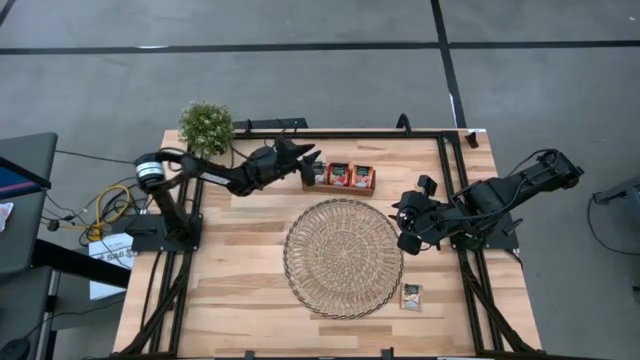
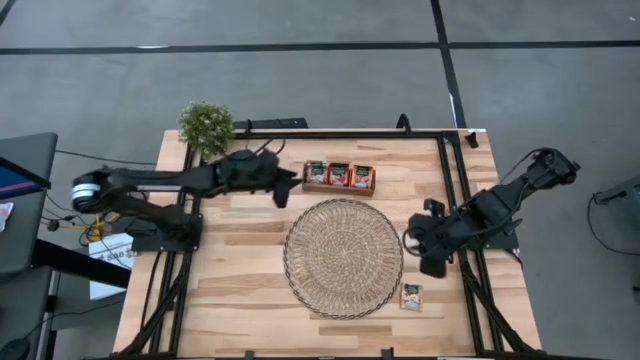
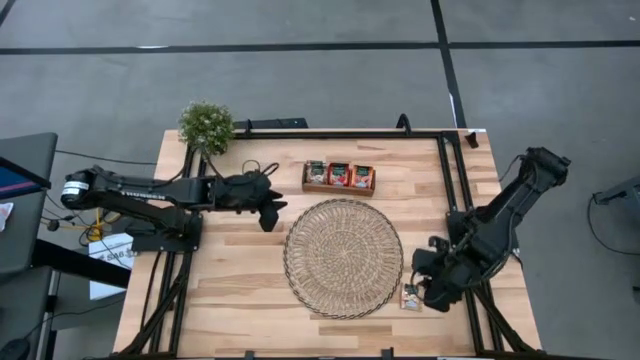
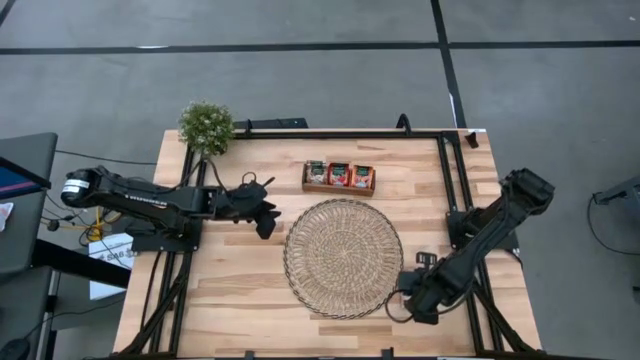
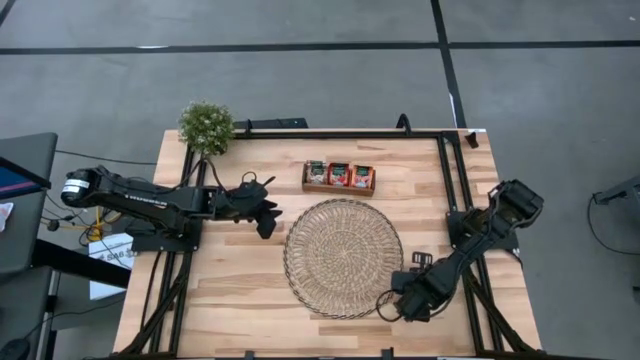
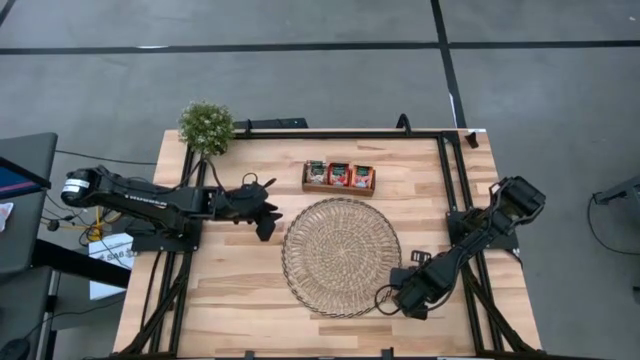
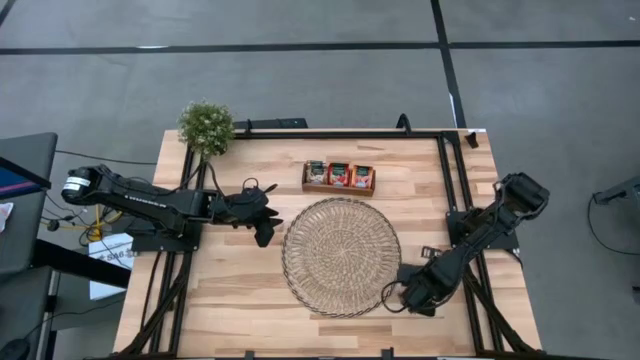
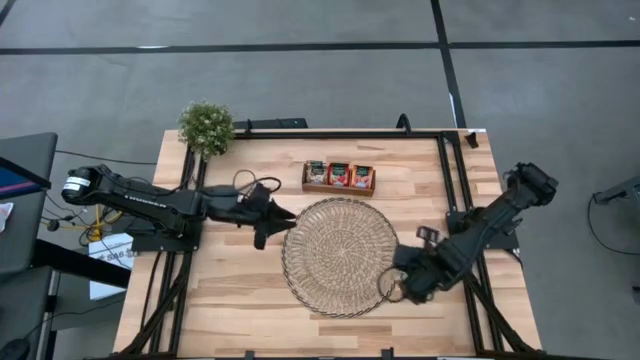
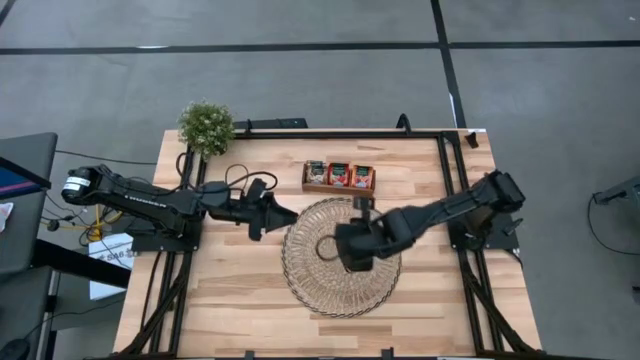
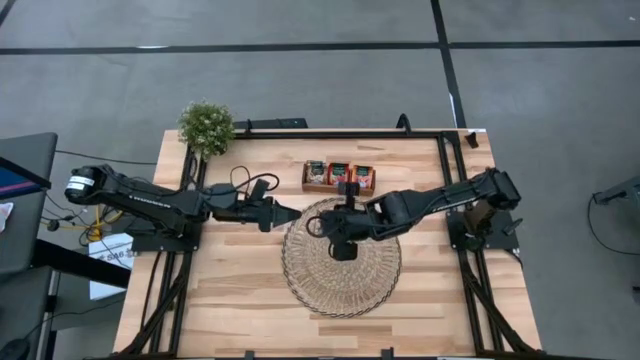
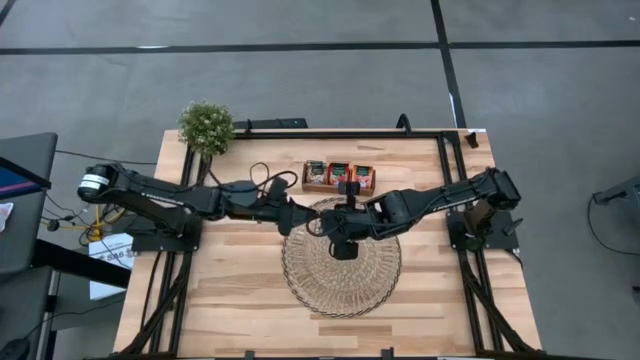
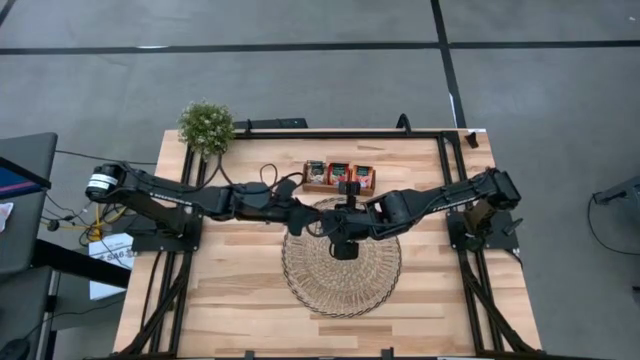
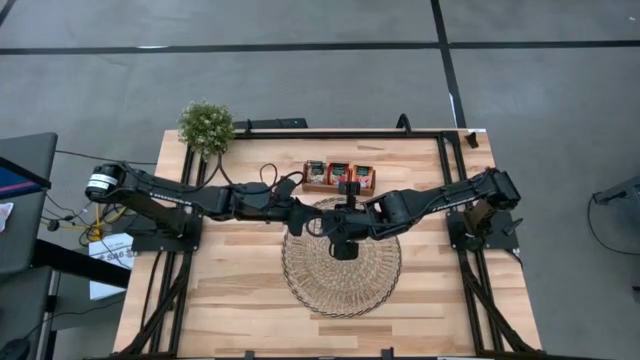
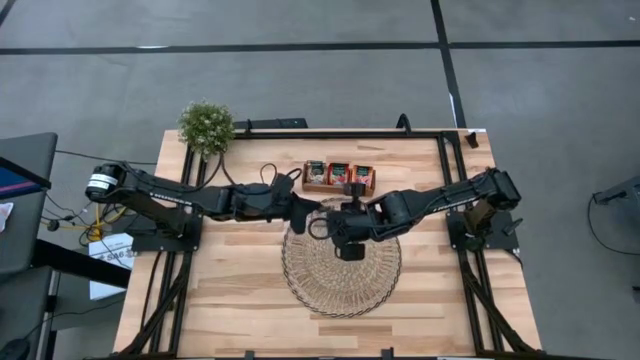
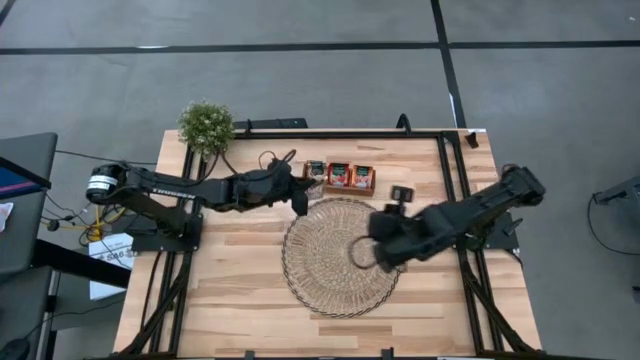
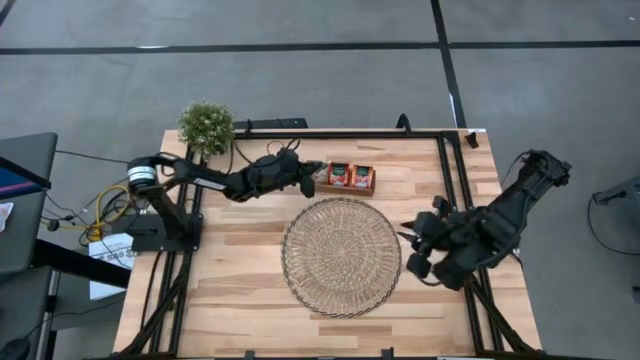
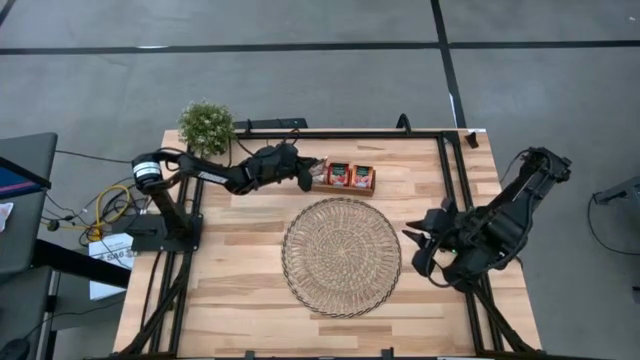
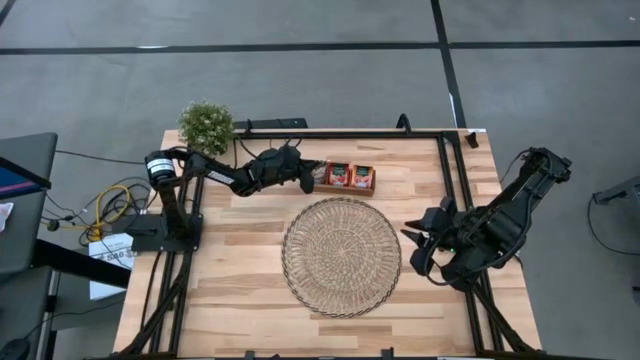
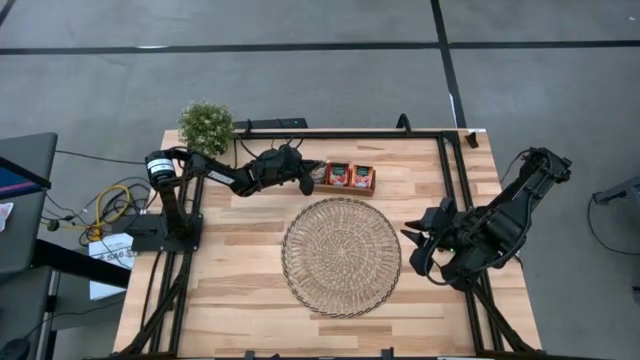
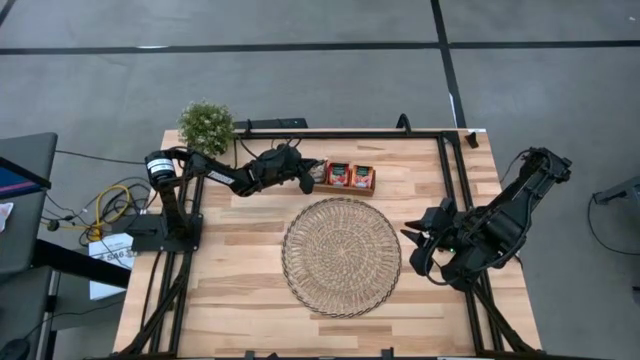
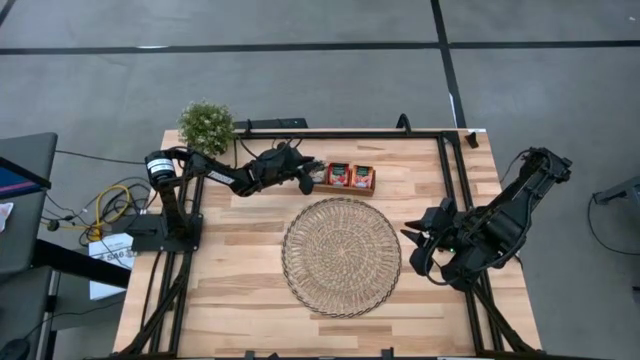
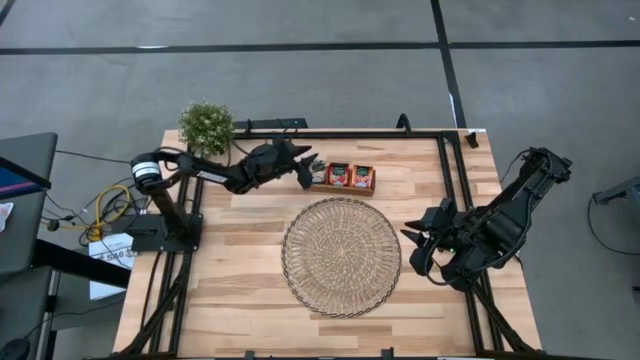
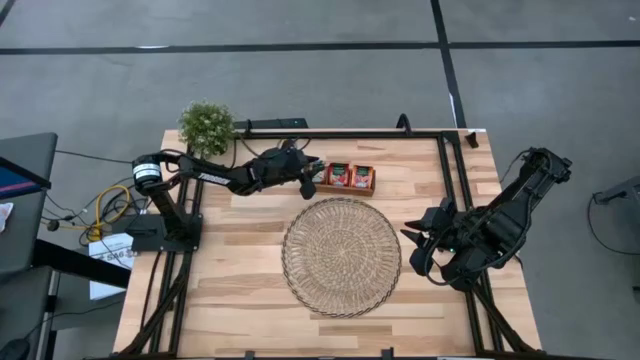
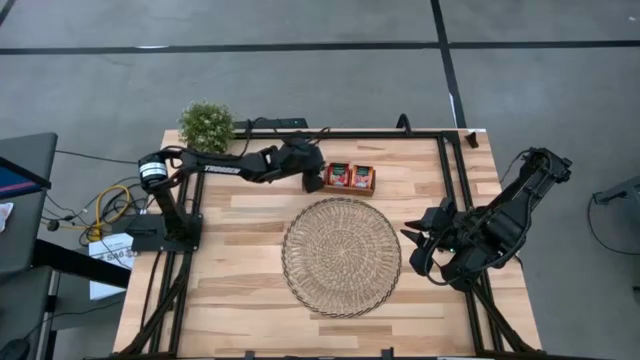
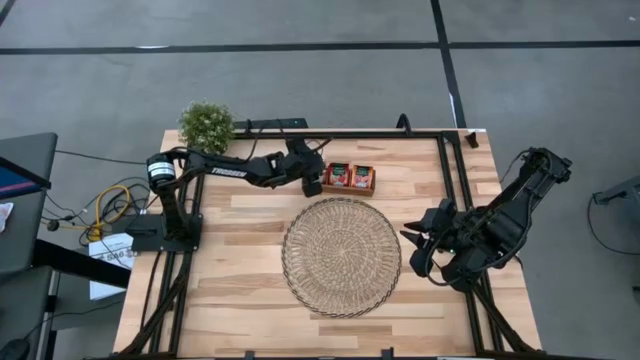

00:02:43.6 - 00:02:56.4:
Task: Pick & Place Tea
Put the brown tea bag into the left section of the wooden organizer

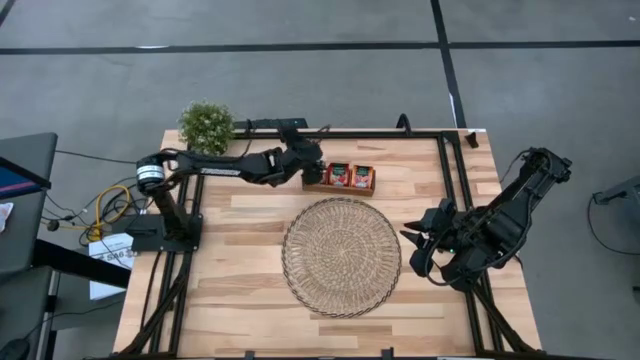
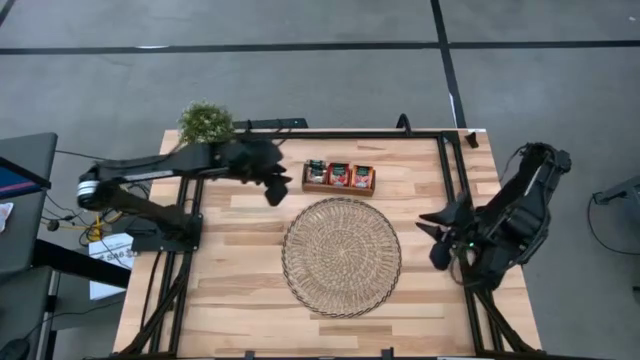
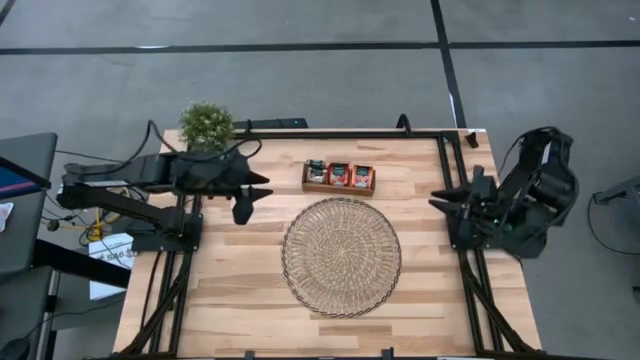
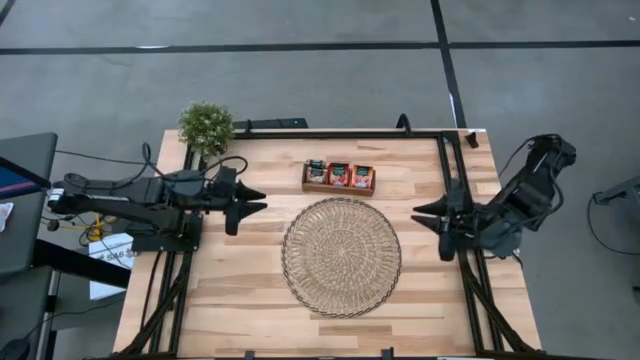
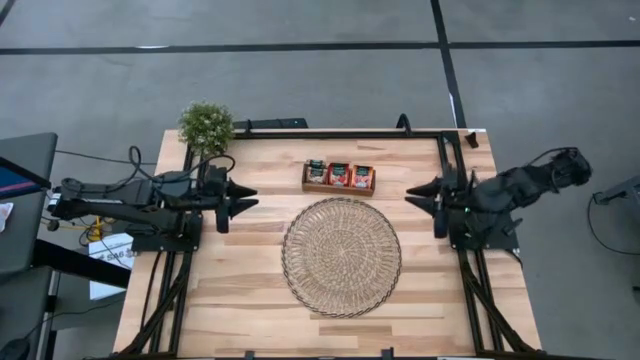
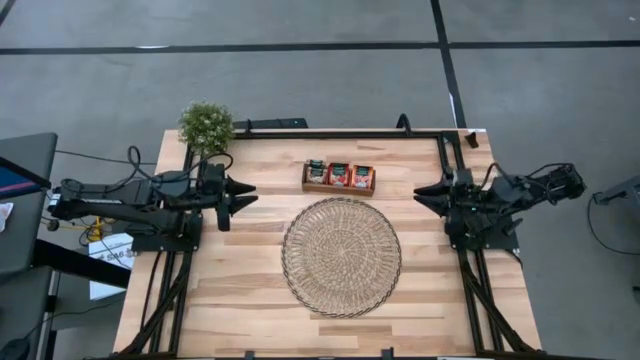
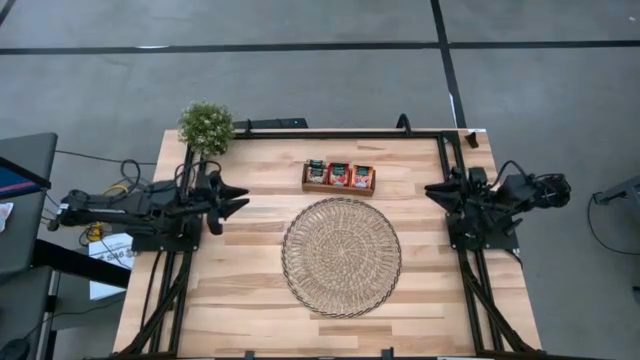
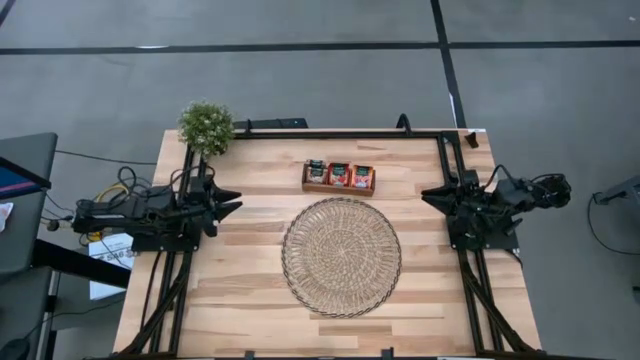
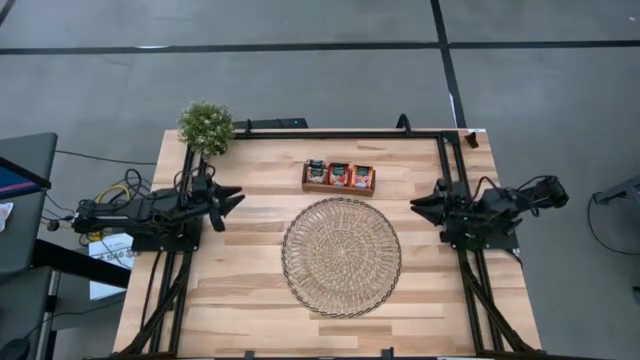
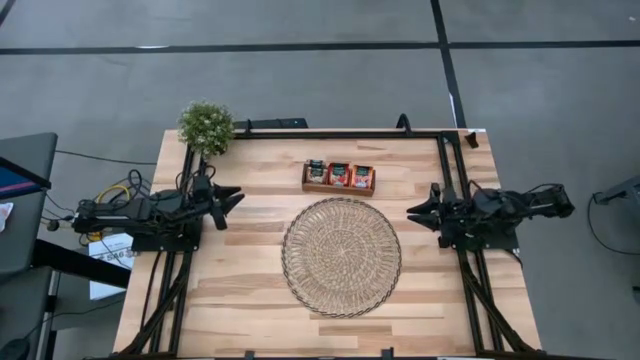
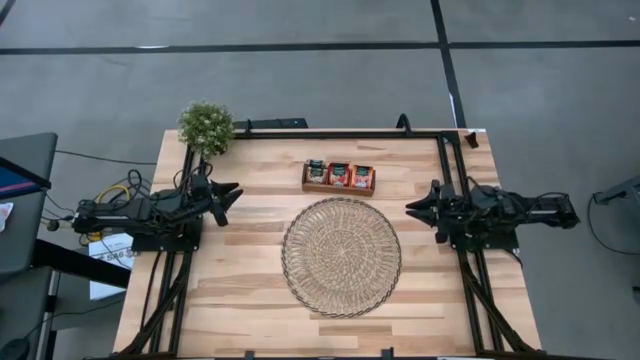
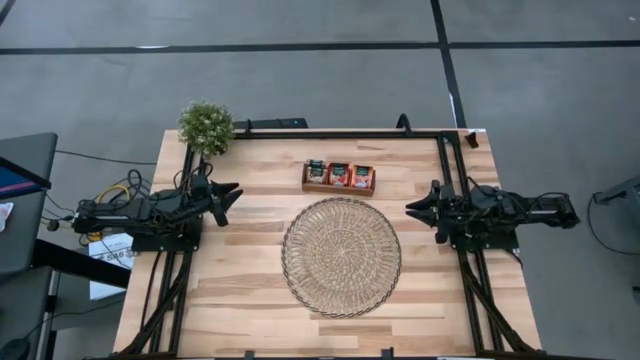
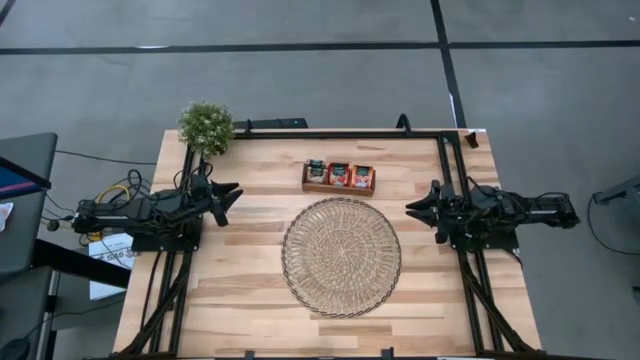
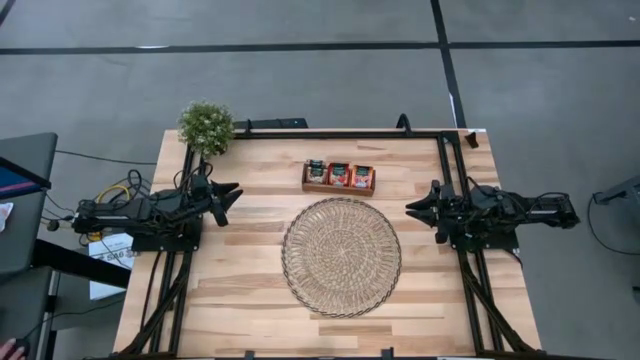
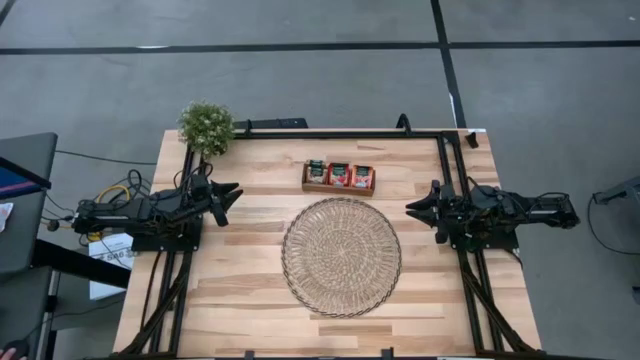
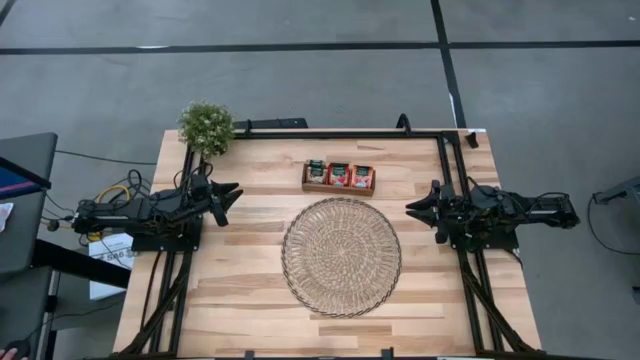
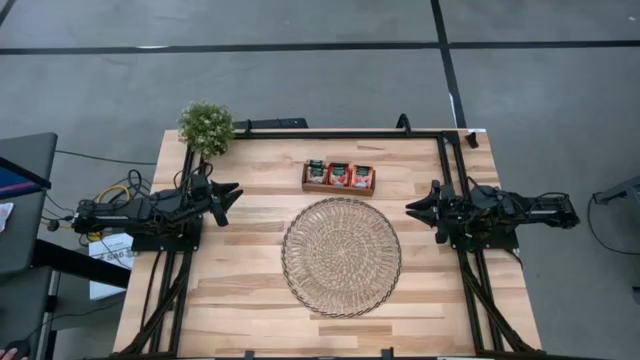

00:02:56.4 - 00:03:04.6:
Return to Home Position

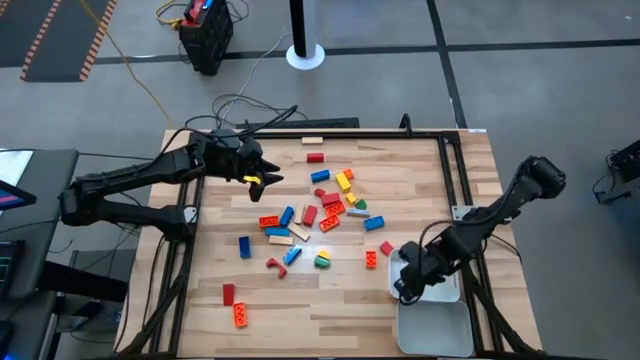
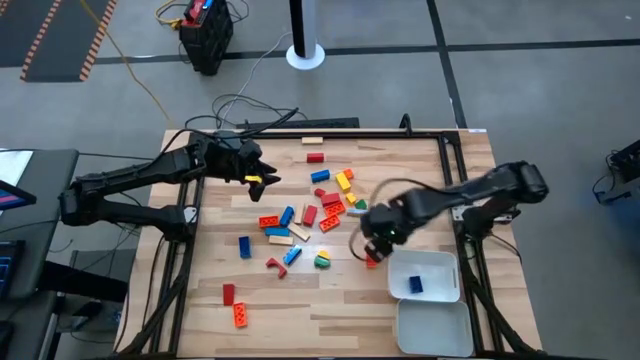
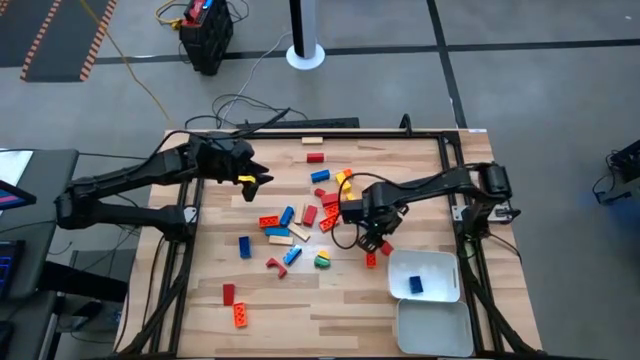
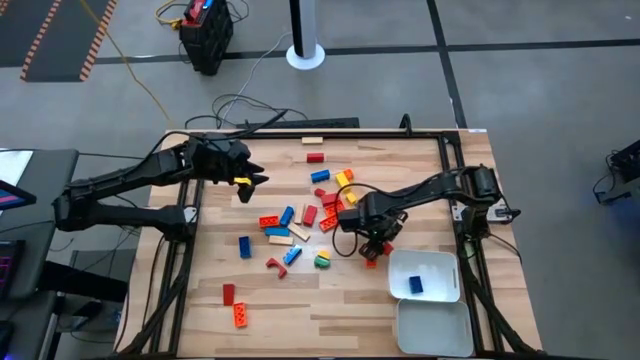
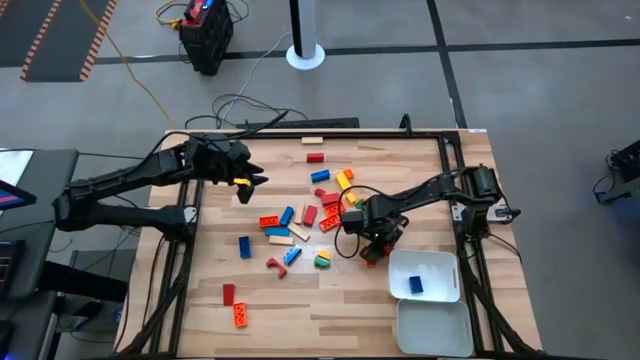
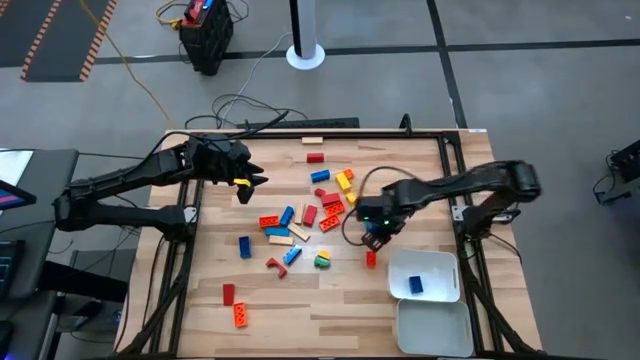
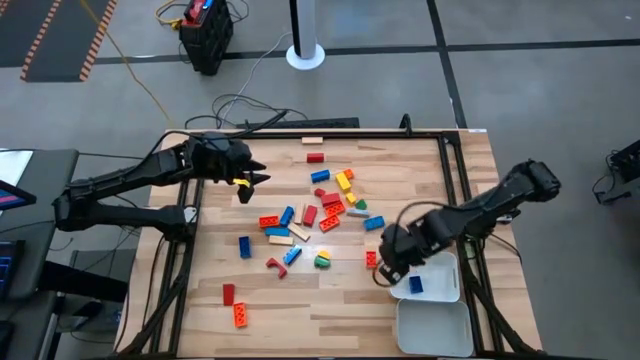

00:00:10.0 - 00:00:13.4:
Task: Sort blocks by size
Put the small red block into the white bin
